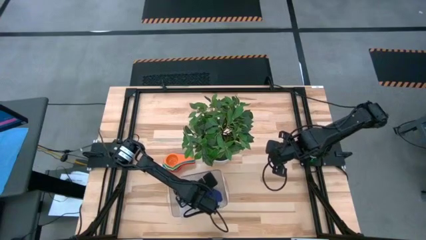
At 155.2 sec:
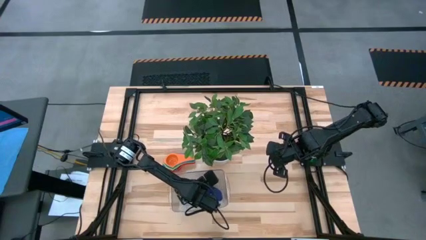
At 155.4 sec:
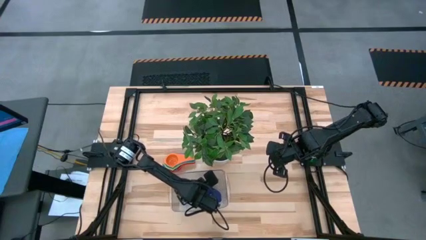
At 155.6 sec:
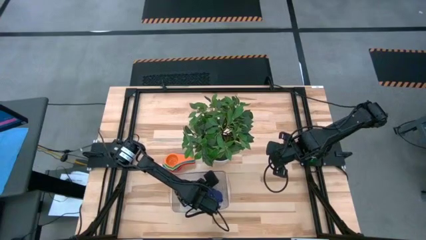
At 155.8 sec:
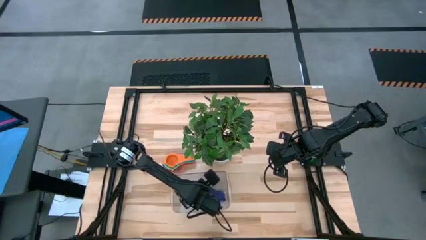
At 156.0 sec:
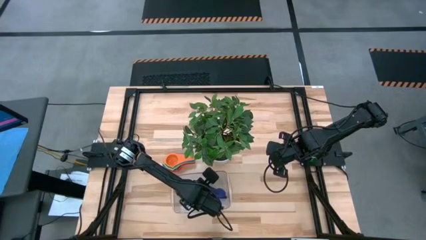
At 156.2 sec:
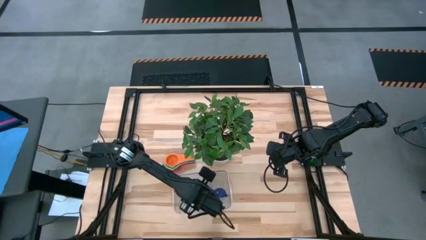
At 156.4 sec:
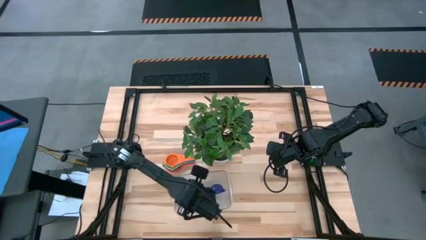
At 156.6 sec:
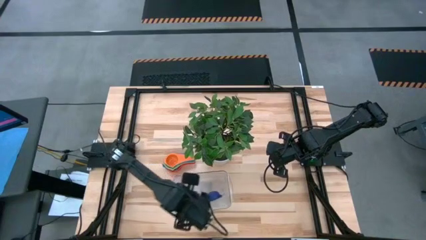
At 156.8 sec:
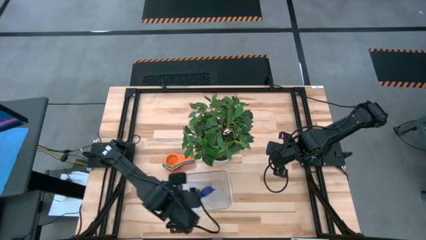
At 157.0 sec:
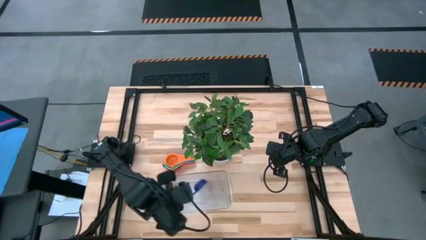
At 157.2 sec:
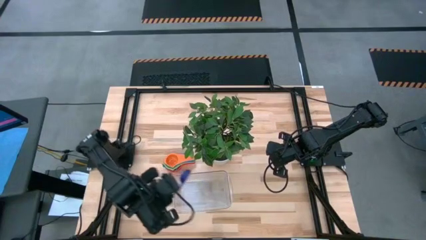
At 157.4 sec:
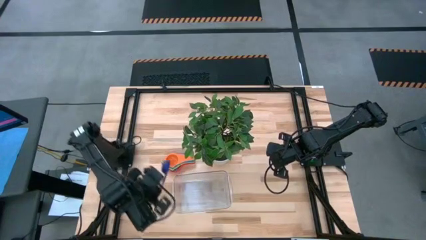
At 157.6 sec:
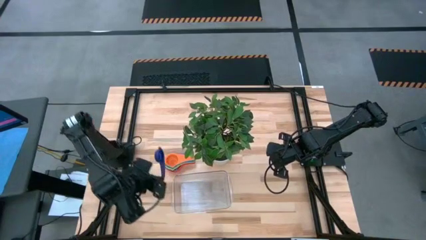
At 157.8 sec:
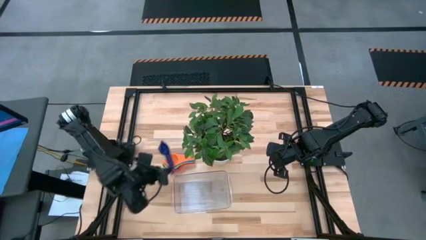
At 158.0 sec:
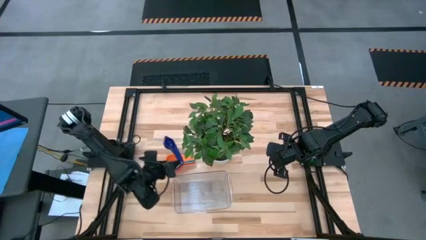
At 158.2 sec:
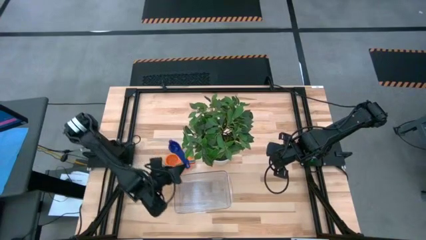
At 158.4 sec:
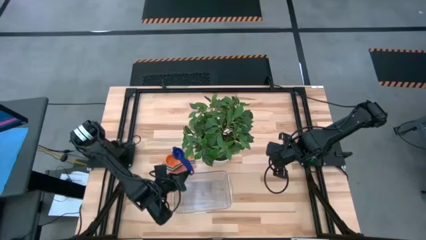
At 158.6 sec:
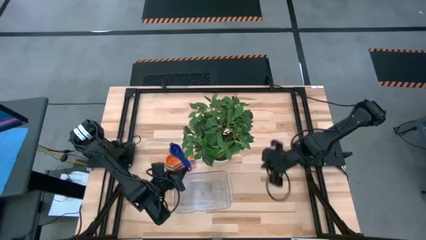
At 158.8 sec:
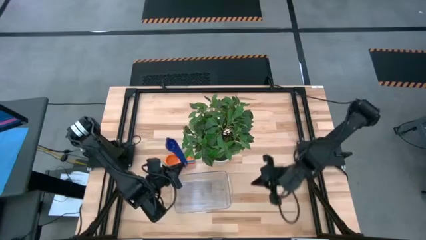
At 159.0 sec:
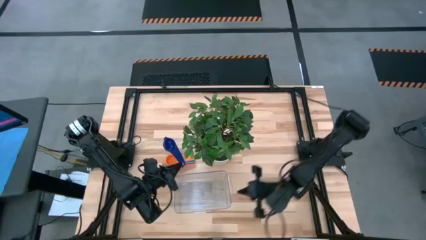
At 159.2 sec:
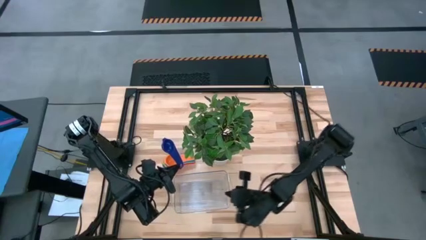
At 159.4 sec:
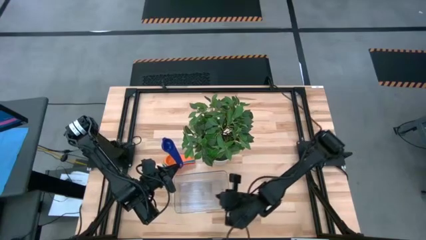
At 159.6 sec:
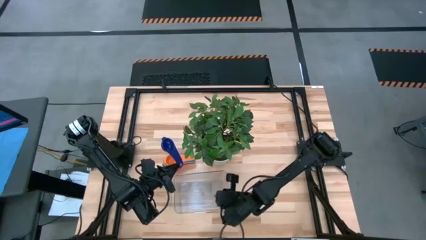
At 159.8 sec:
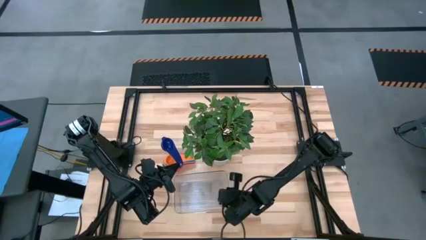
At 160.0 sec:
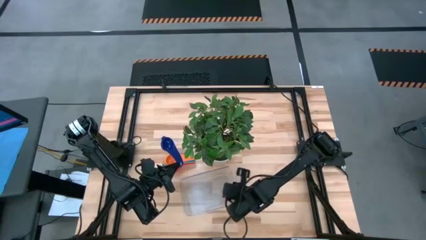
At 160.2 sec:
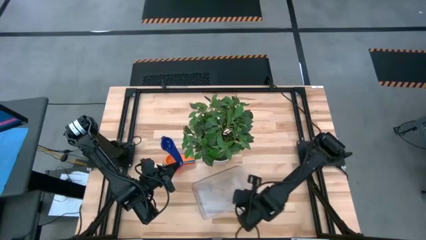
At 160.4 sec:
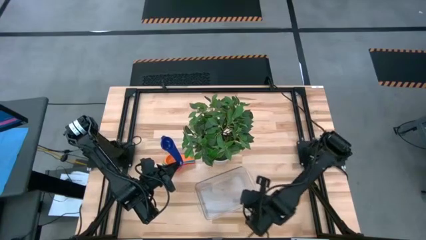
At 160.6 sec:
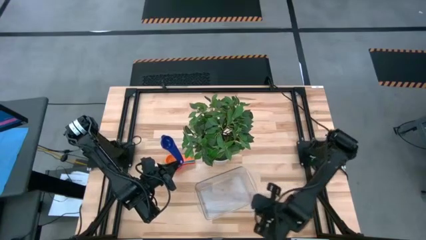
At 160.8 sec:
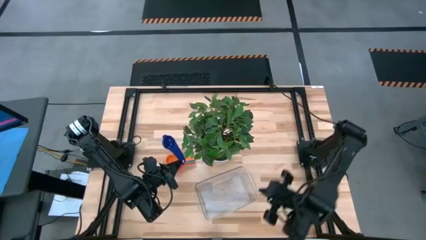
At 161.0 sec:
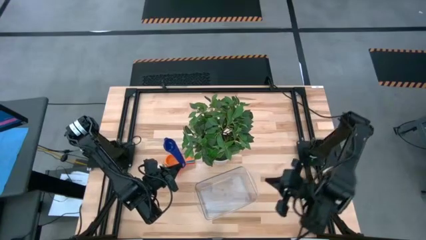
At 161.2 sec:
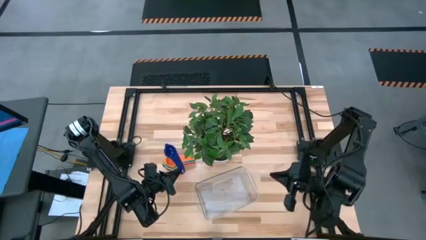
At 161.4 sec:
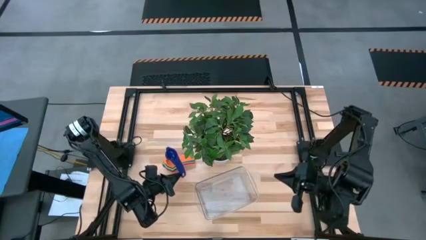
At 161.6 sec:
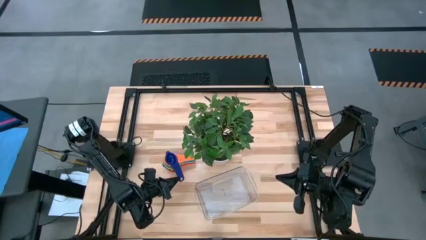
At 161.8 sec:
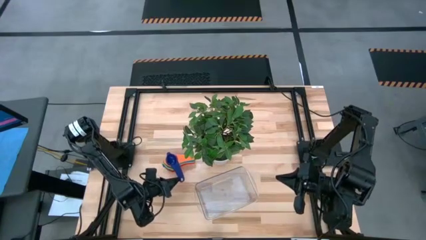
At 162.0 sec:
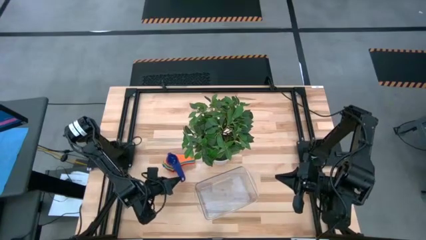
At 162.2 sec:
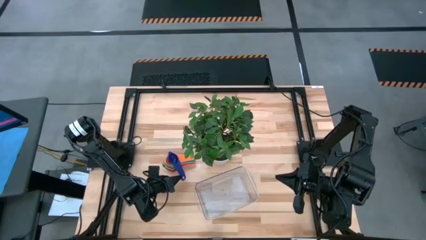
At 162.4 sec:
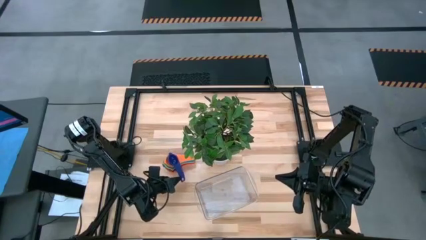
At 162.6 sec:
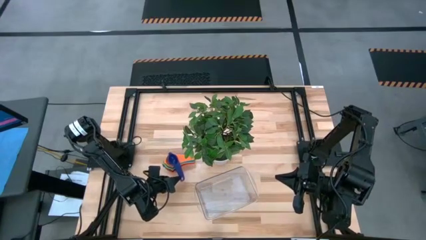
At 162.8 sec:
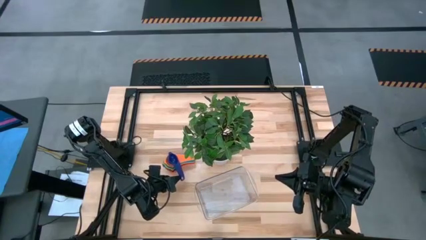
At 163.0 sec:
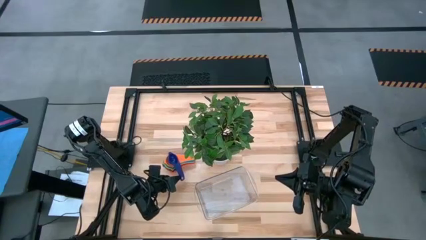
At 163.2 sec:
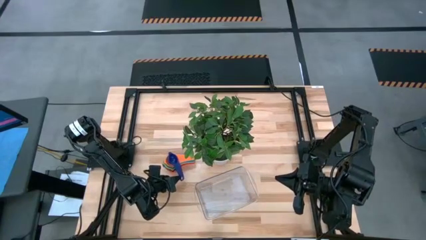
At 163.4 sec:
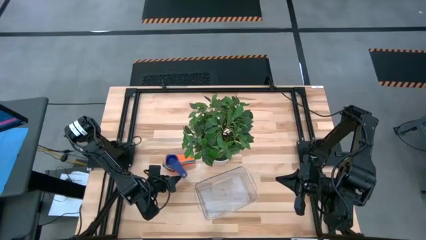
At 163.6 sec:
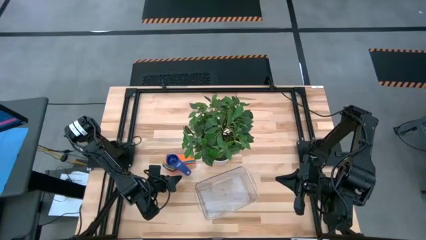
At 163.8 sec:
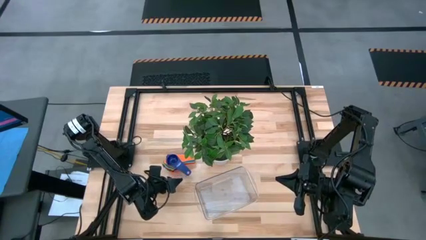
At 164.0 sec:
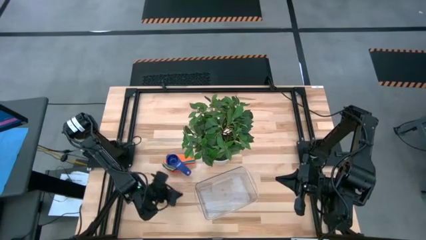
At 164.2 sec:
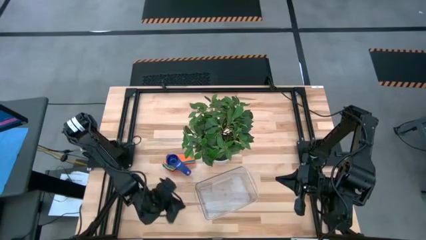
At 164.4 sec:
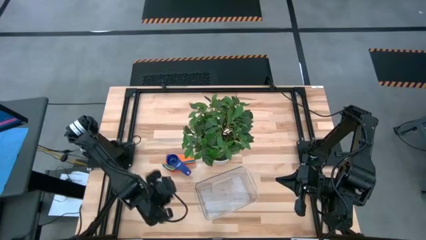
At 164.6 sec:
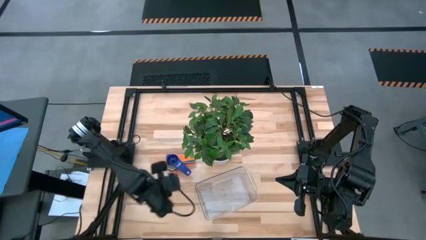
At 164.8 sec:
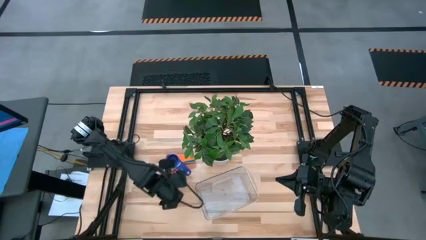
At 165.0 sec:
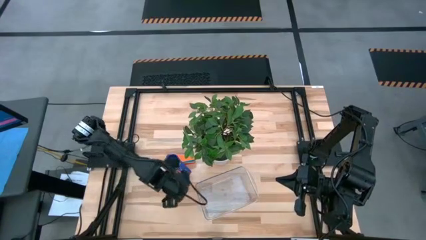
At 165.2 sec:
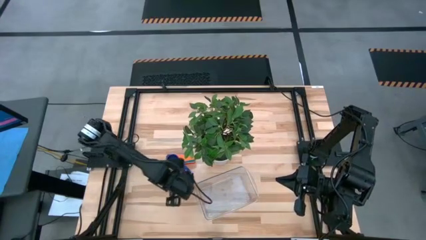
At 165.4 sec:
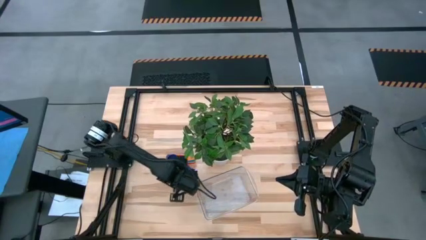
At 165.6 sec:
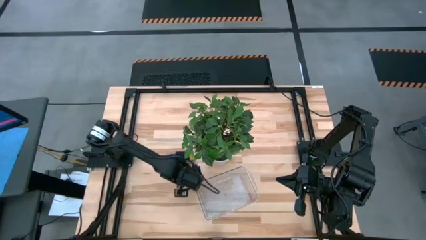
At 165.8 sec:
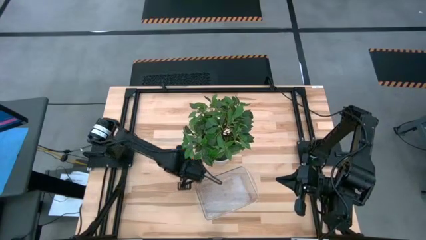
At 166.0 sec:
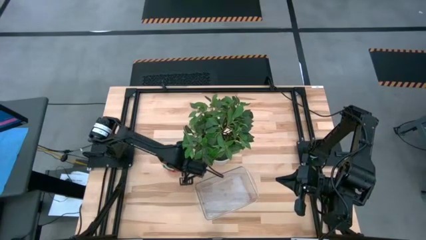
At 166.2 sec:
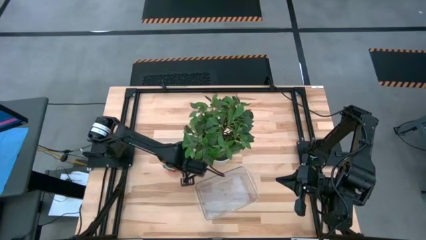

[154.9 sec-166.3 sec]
Task: Nest measuring cups in basket
Stack the dark blue measuring cup on the orange measuring cup

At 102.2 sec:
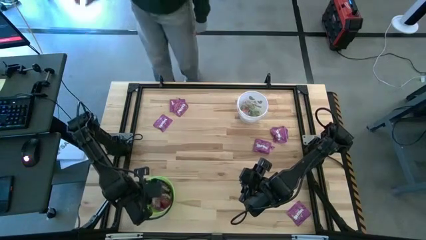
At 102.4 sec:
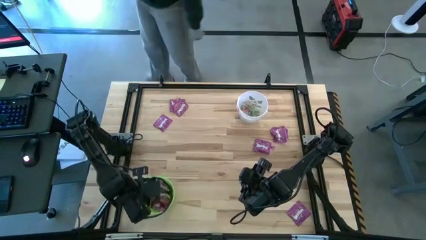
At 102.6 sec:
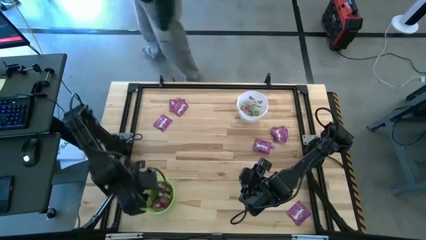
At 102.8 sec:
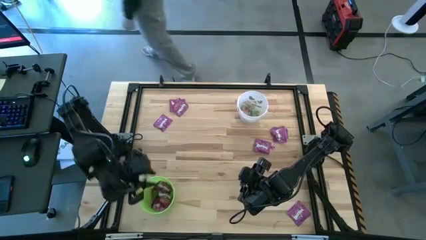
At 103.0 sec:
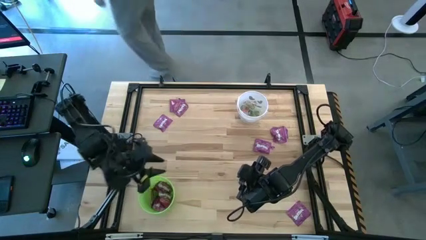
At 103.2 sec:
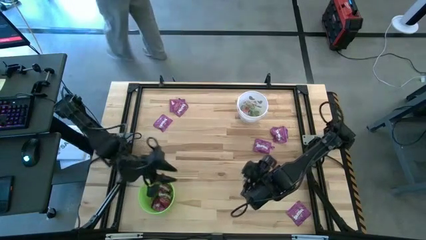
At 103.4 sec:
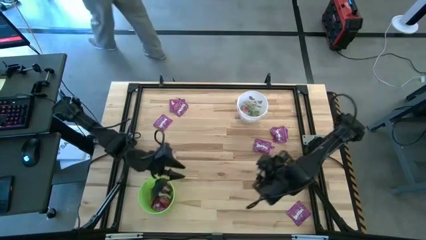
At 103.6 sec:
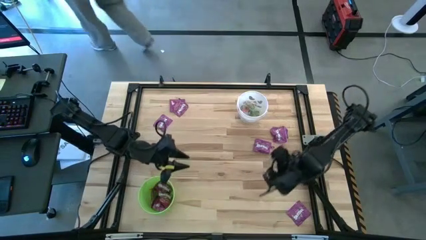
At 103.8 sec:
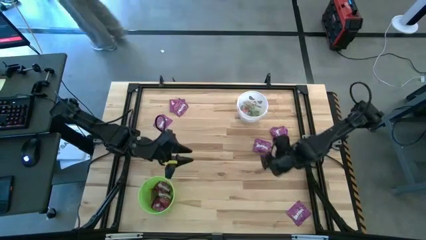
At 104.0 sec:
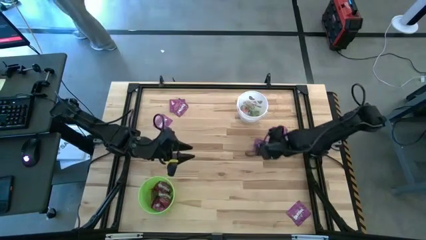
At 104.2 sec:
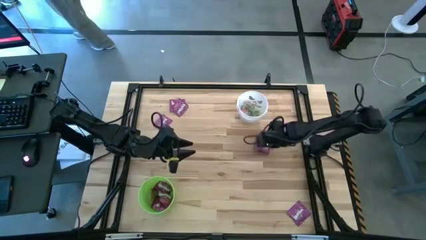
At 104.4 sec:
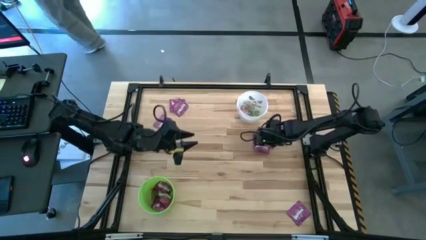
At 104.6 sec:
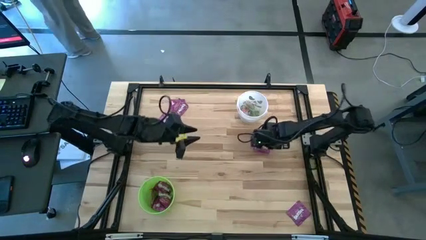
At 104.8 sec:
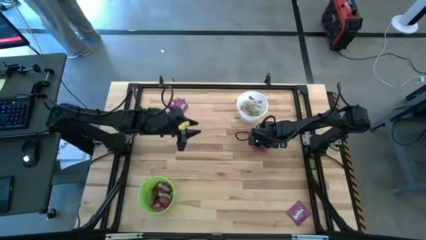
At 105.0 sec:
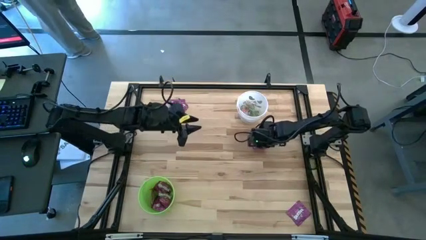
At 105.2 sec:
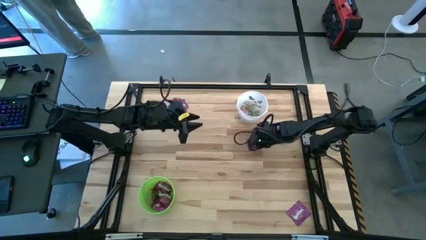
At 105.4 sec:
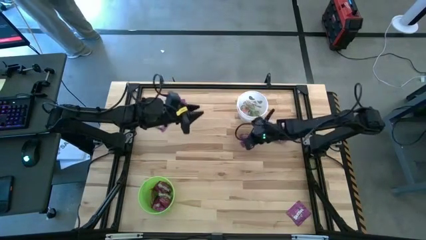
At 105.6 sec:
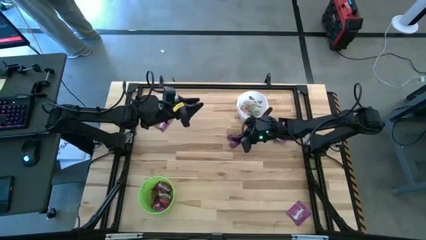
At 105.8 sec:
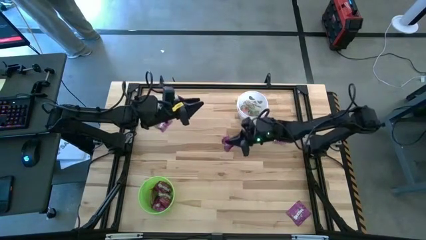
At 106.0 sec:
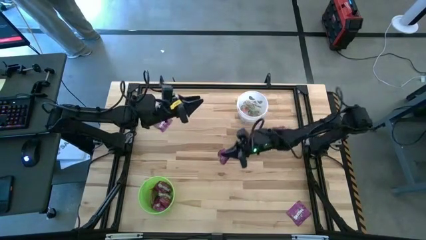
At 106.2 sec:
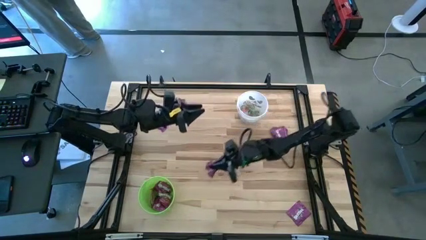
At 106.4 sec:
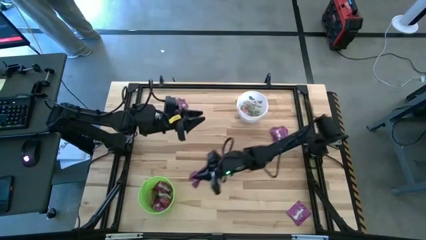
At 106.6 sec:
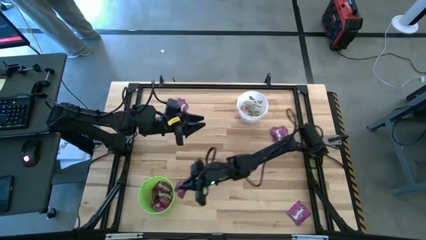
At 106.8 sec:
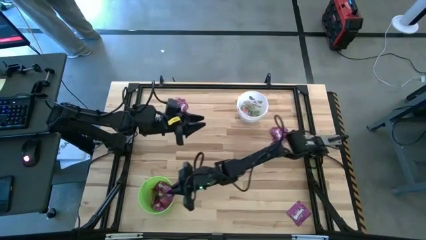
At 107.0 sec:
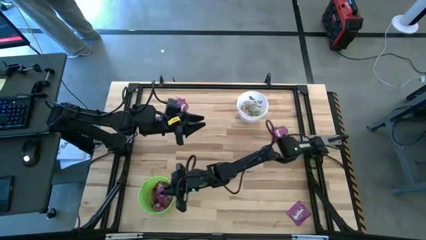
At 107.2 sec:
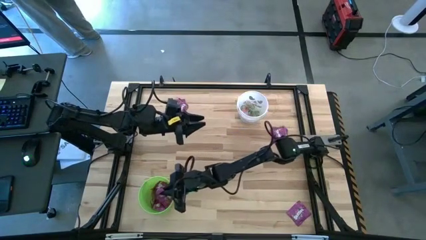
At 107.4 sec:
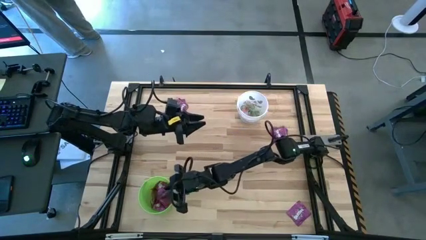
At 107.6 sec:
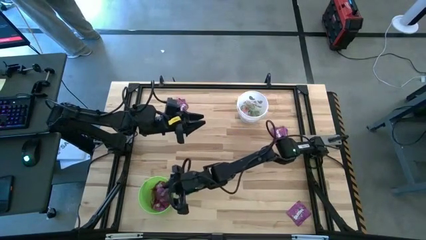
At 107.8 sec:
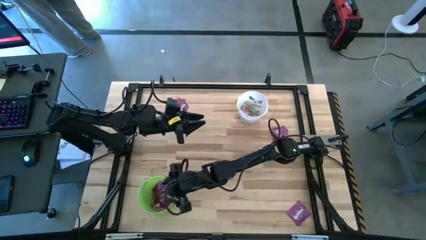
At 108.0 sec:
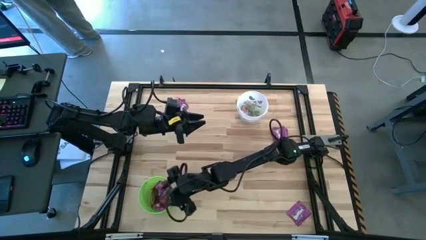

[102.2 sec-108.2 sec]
Task: Sort candy by brand, put in halloween buckets
Put the purple candy into the green bucket
